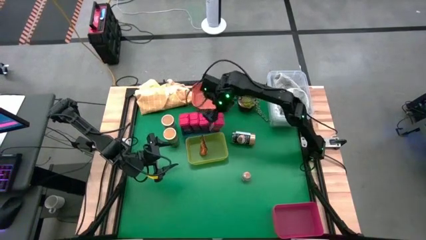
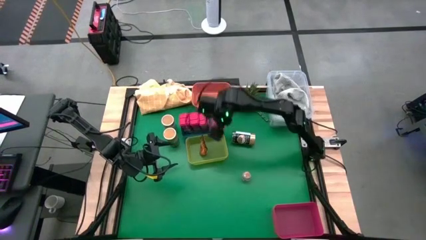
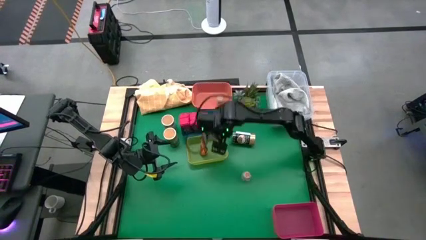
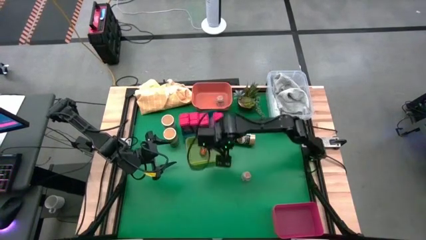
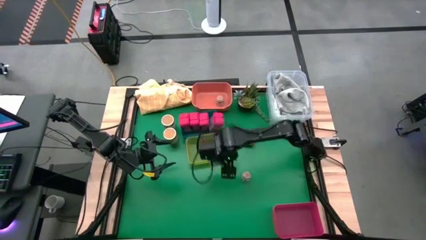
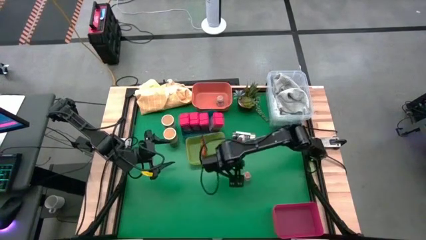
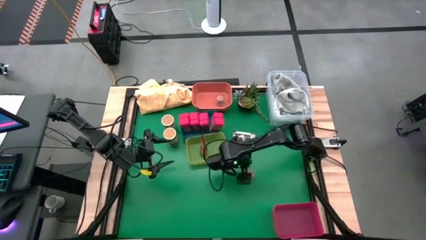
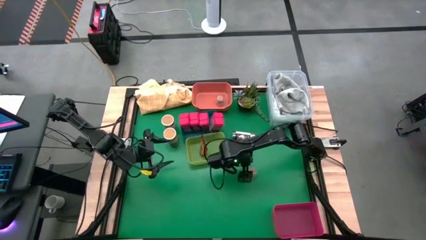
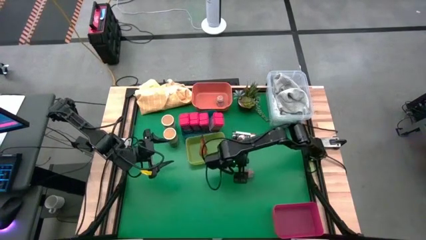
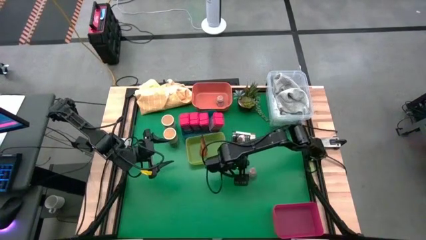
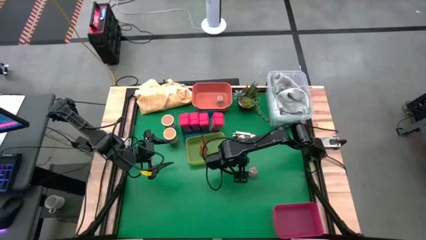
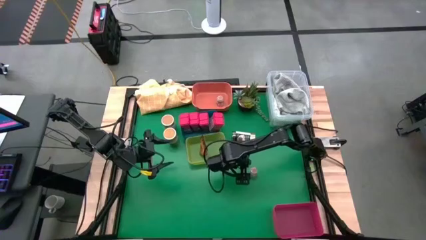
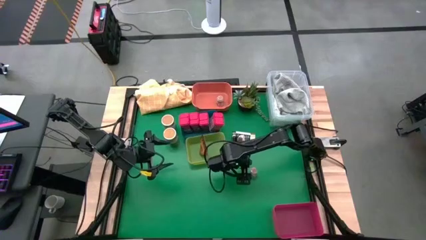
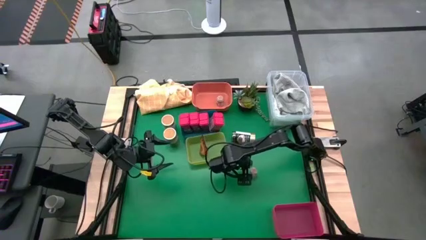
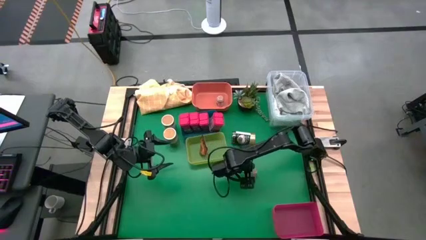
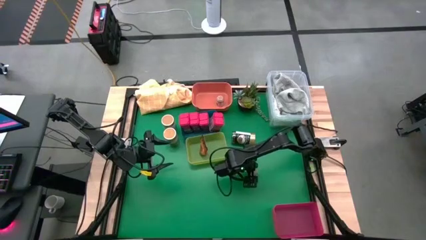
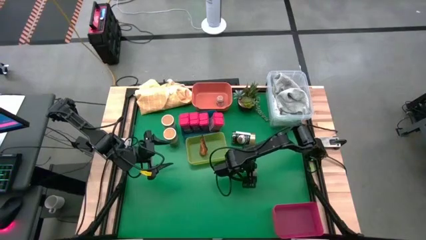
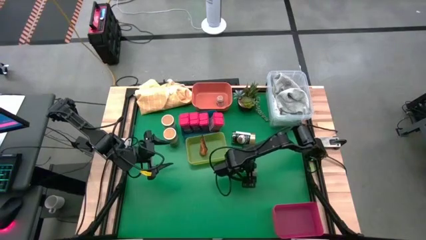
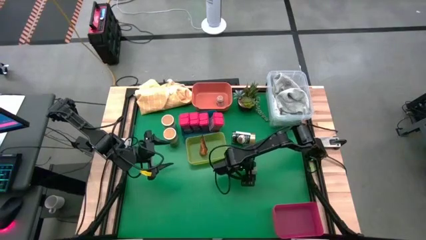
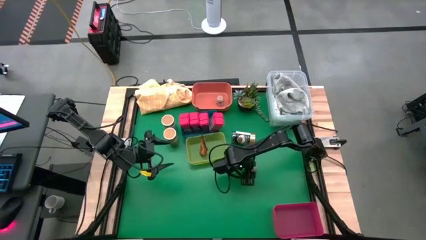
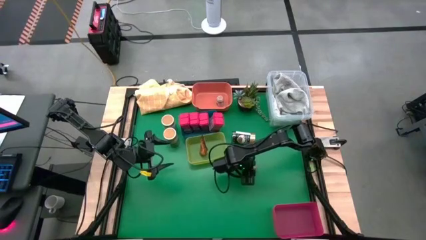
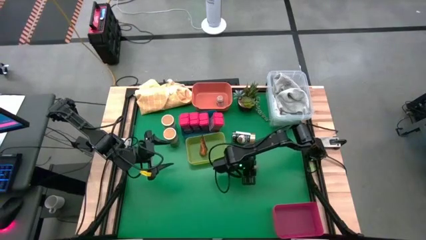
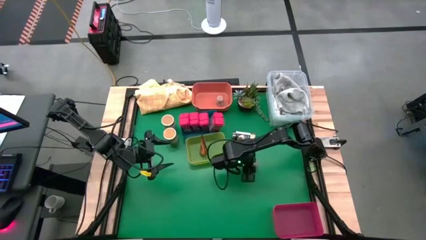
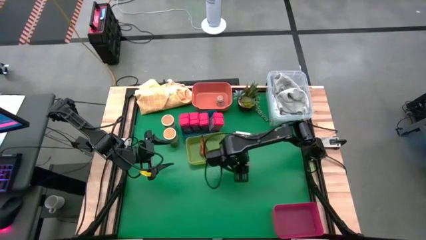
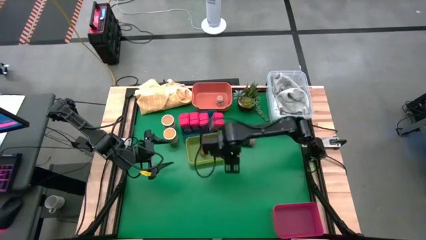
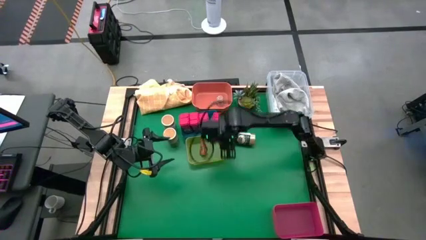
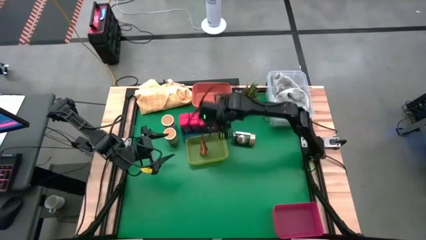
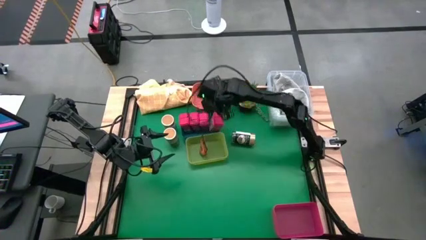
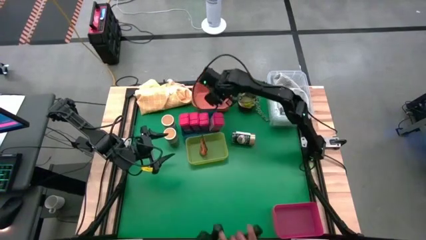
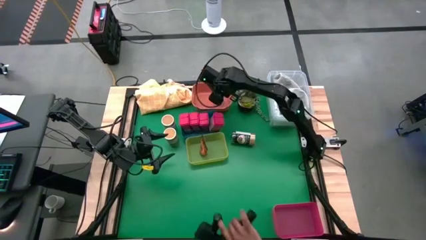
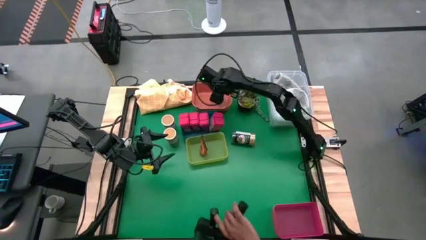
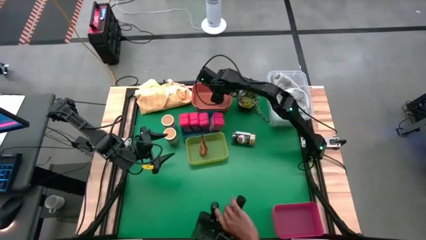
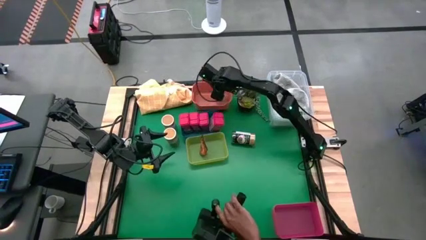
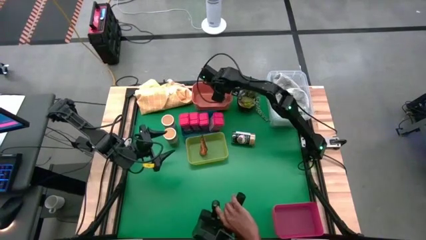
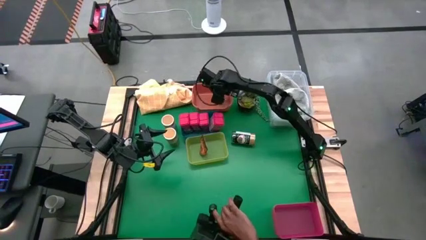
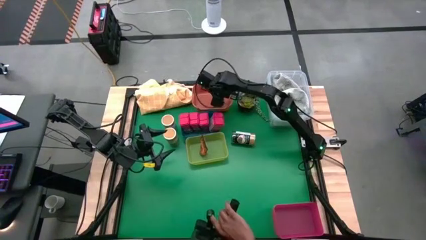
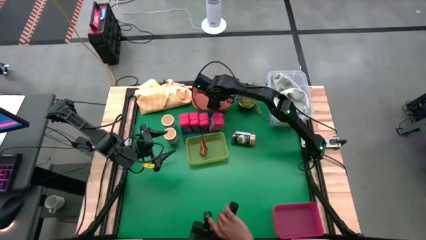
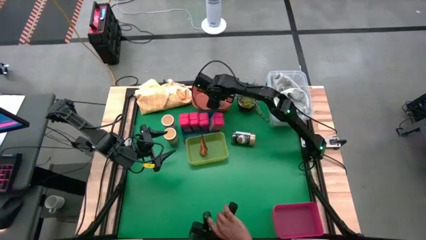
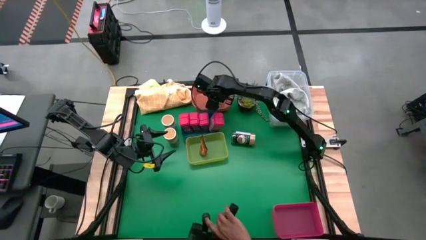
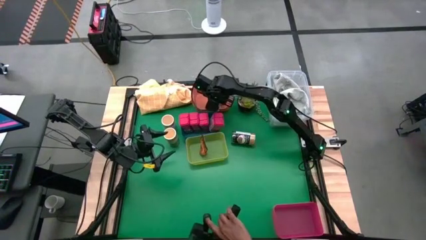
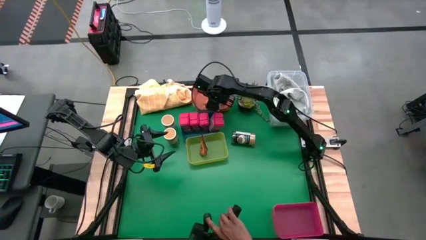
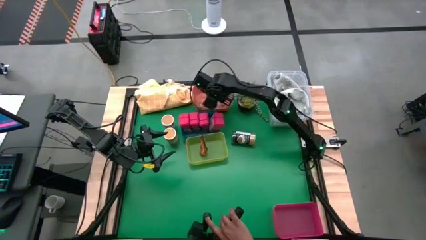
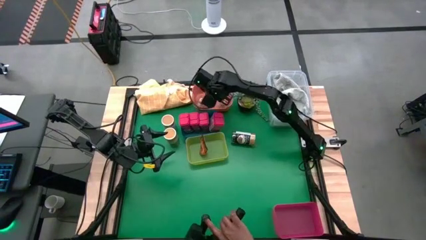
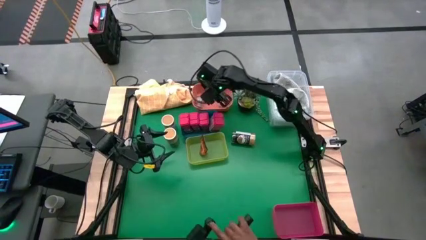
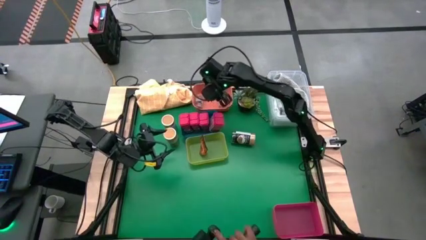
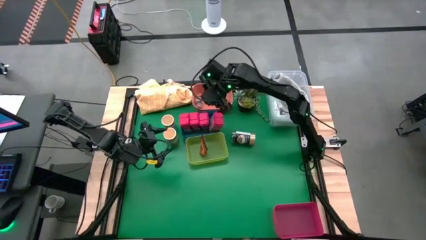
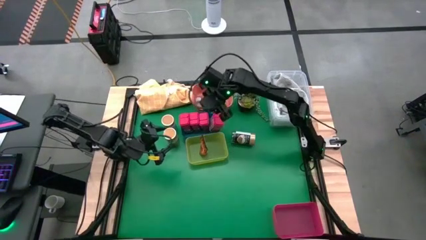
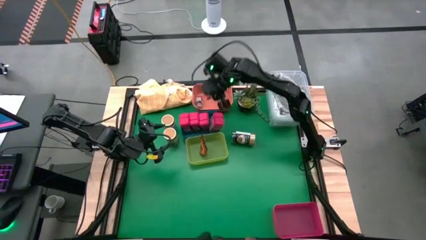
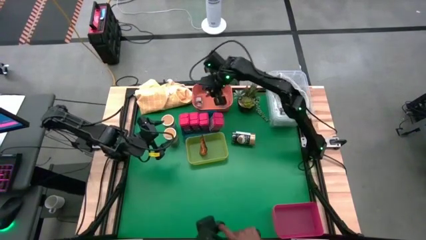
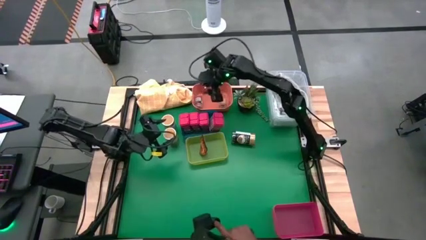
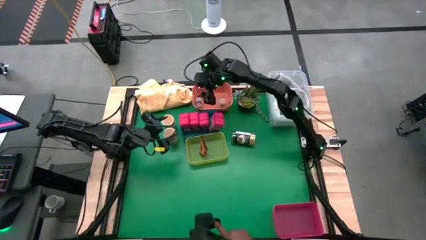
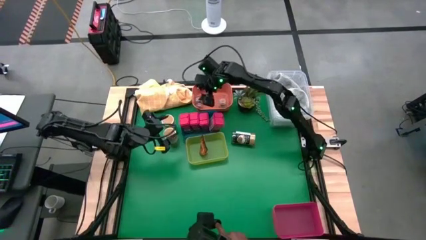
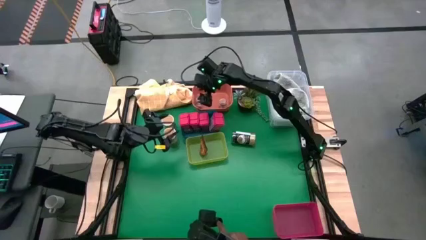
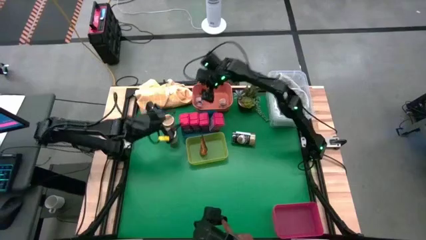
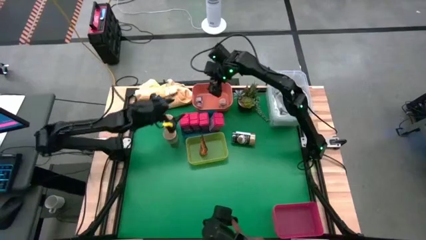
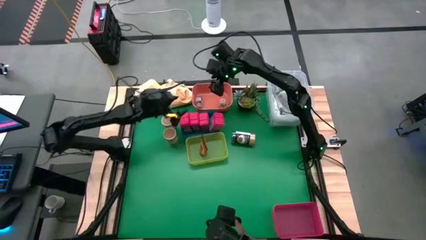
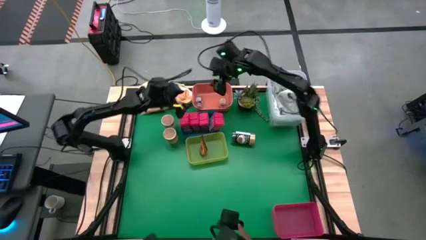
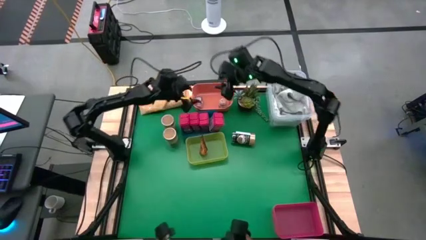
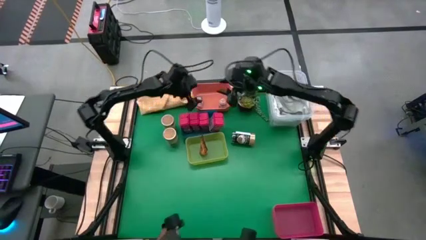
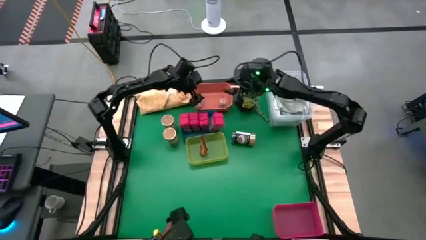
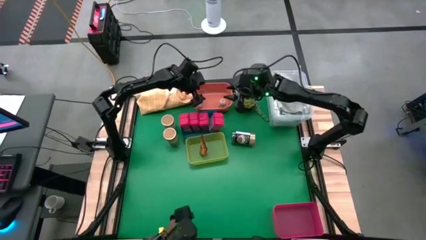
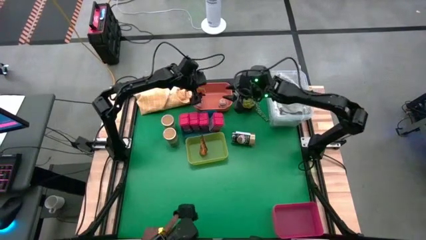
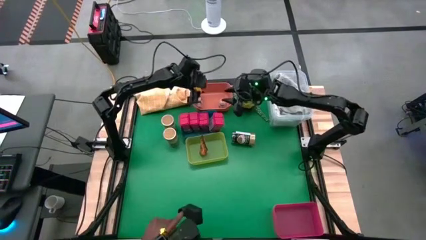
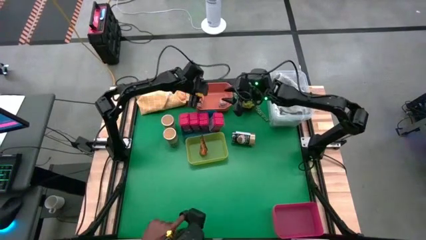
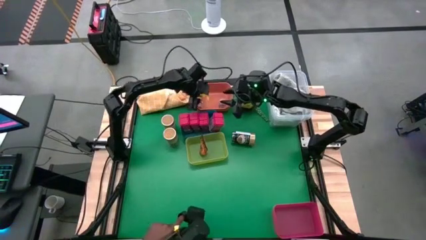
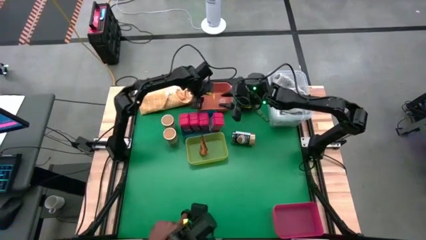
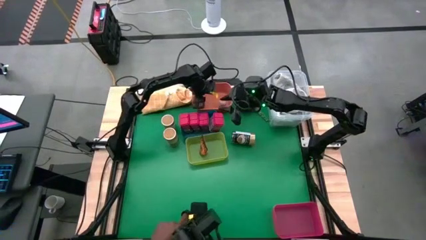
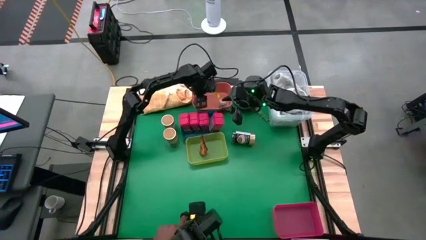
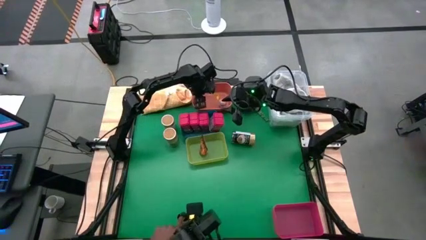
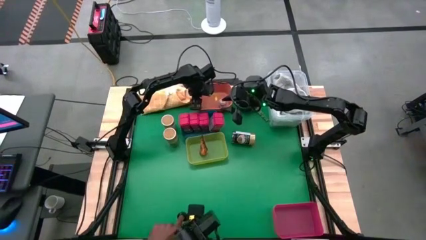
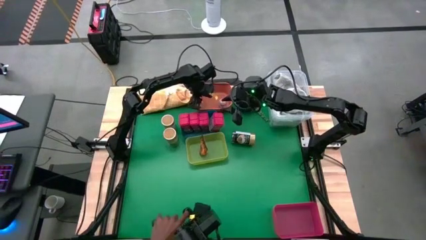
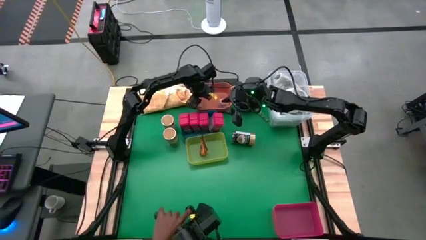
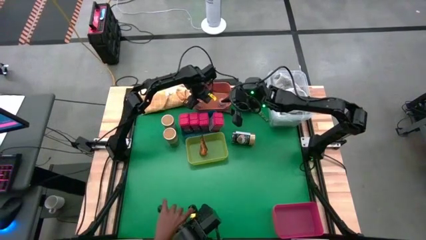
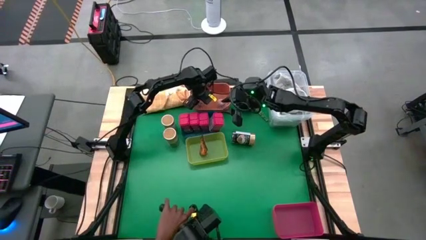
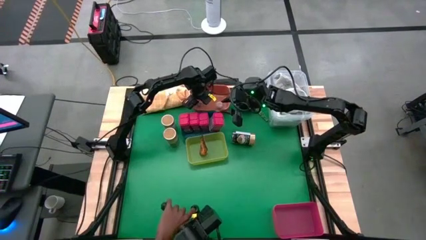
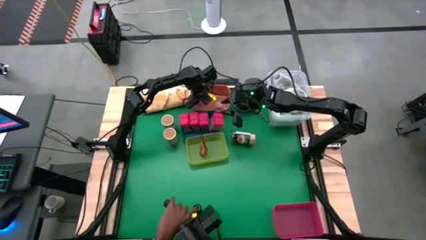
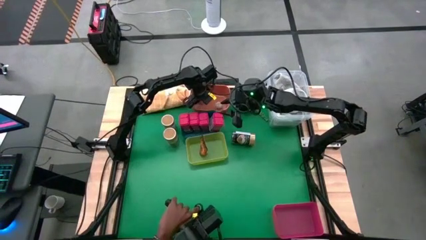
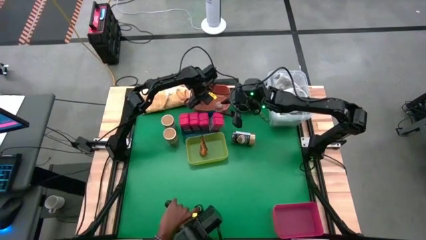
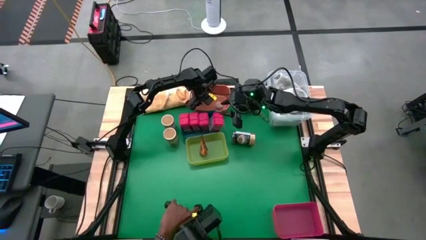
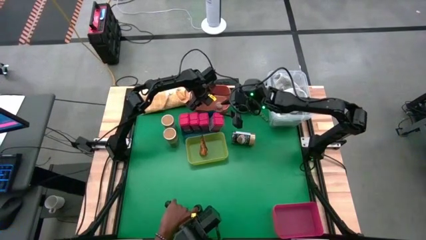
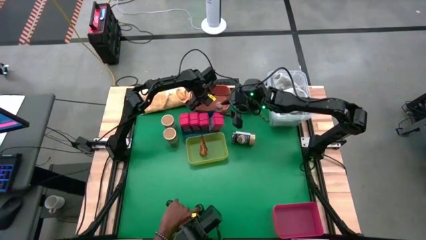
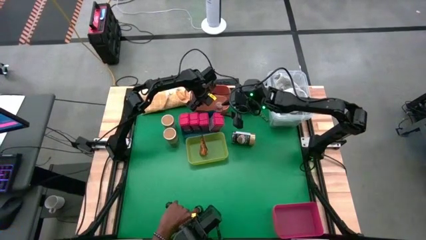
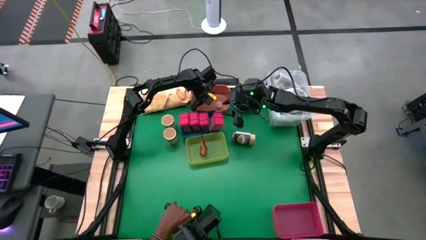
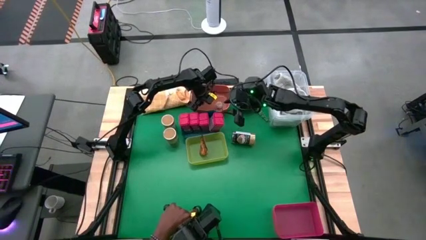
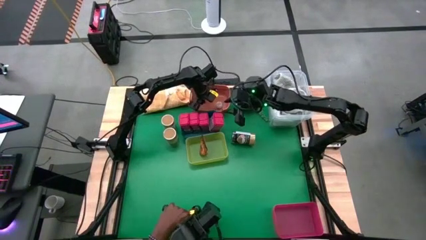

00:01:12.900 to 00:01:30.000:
Task: Sort spices by type
Put the brown seasoning bottle into the orange bin
